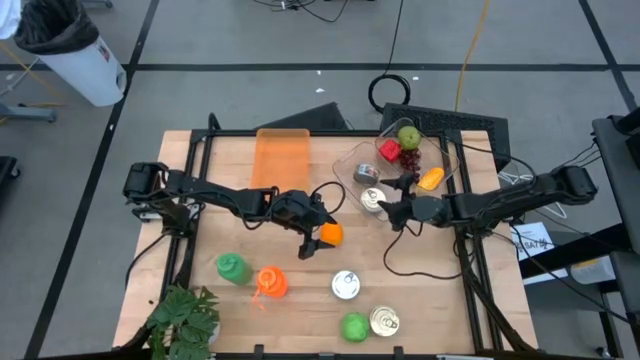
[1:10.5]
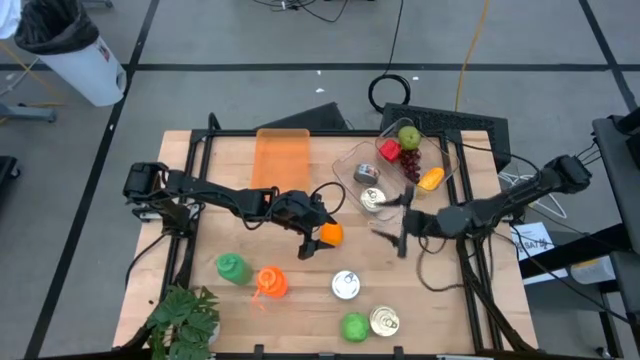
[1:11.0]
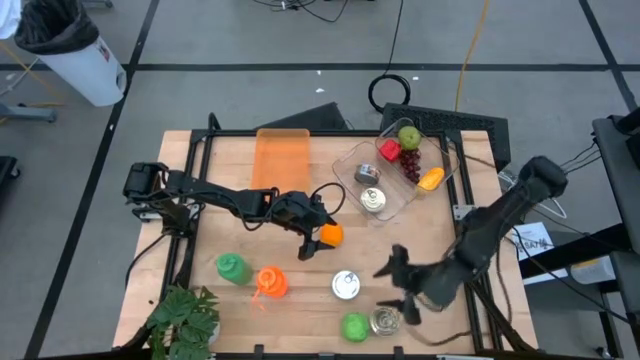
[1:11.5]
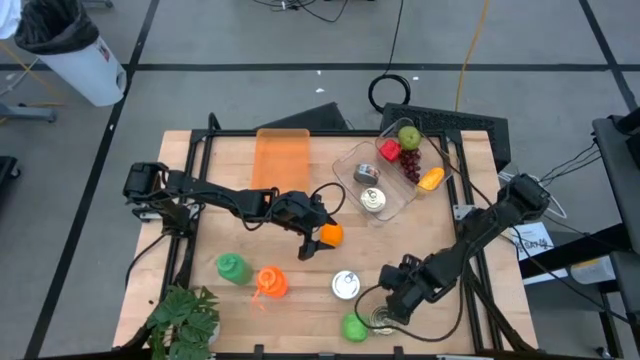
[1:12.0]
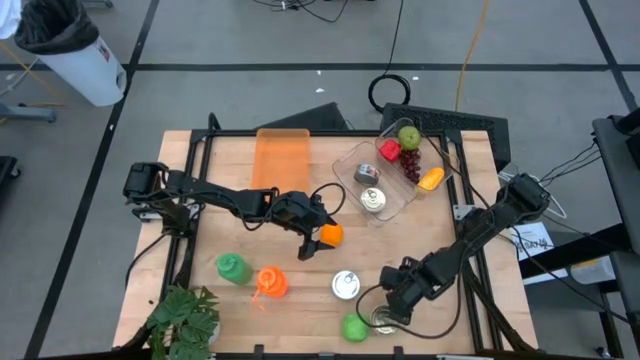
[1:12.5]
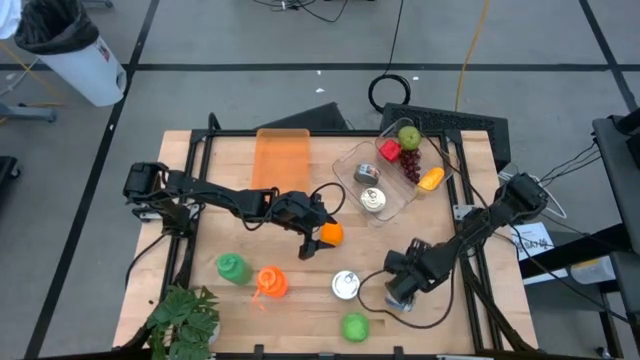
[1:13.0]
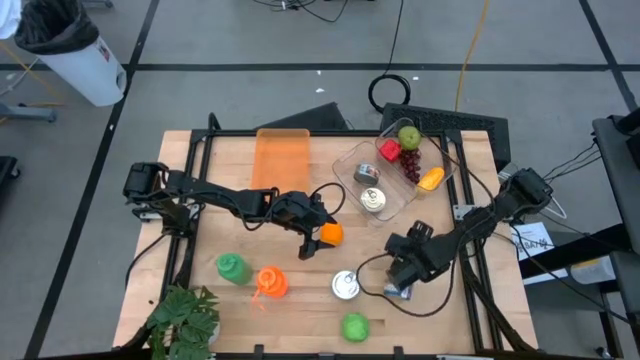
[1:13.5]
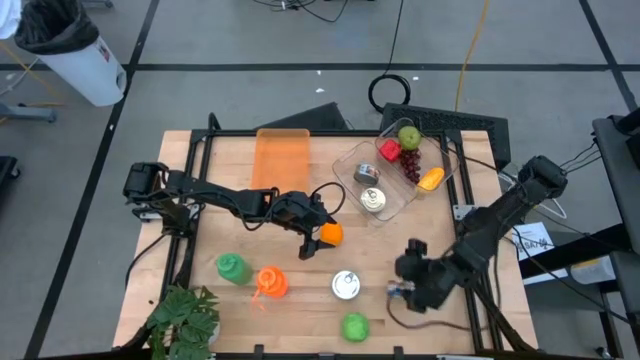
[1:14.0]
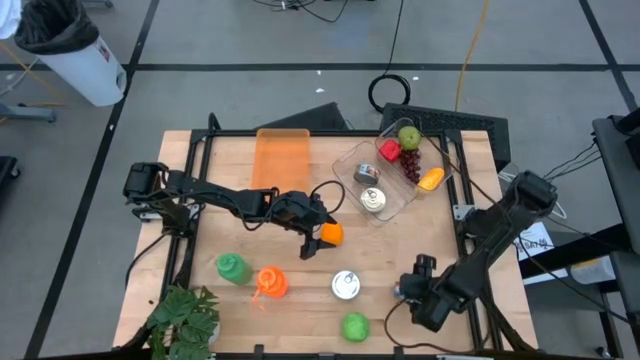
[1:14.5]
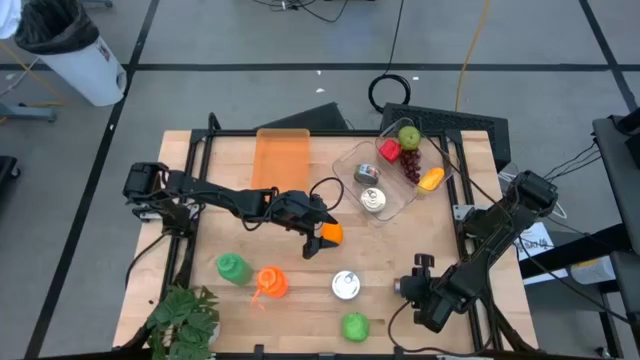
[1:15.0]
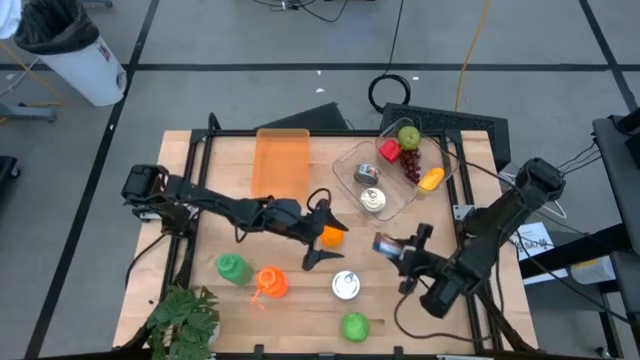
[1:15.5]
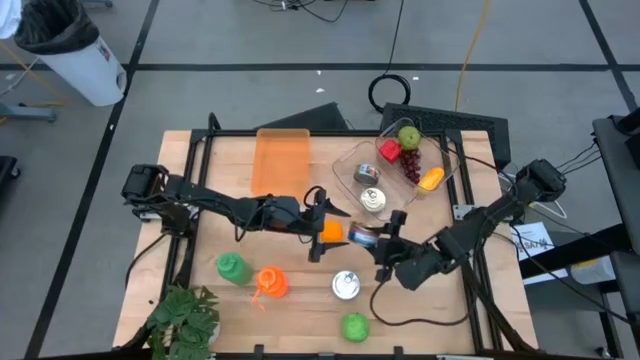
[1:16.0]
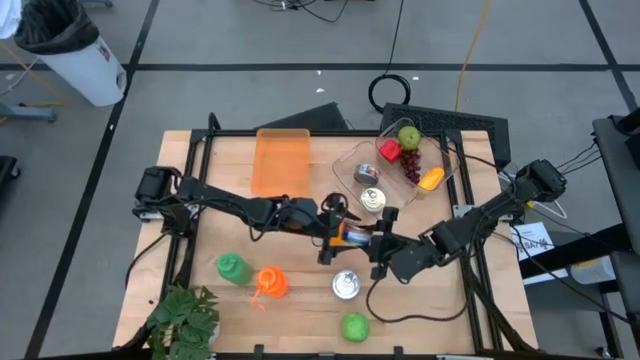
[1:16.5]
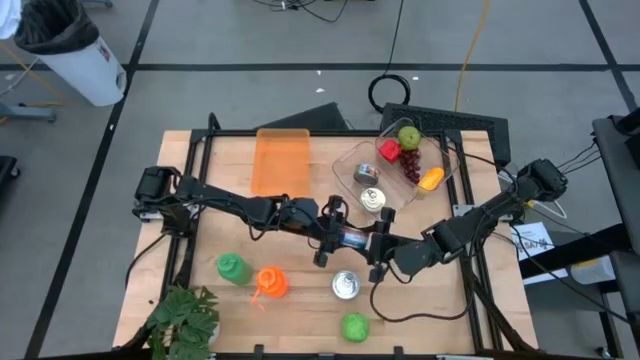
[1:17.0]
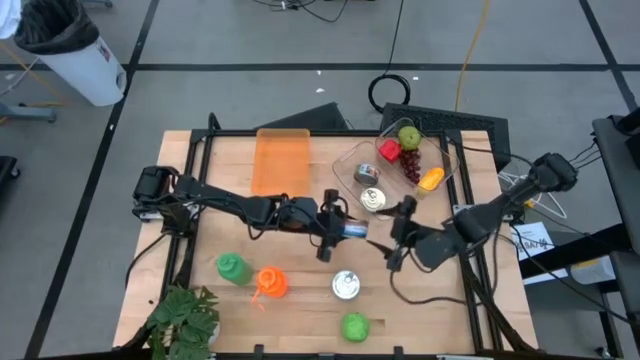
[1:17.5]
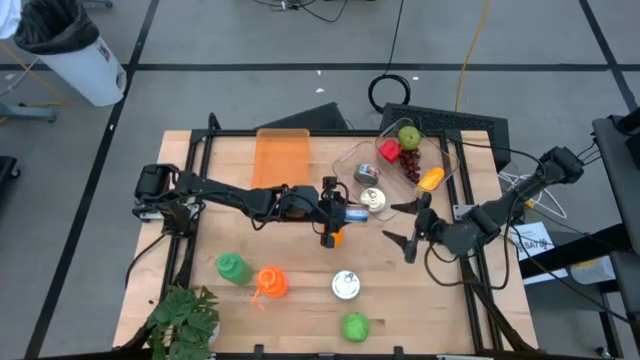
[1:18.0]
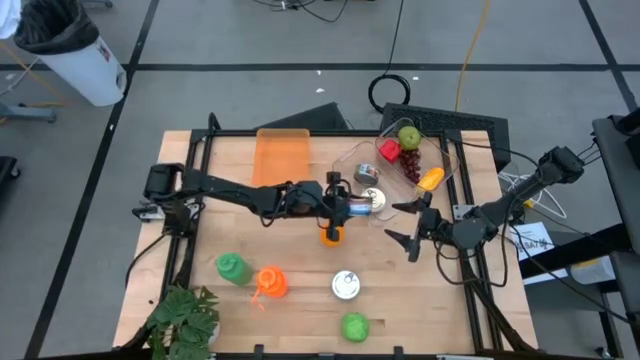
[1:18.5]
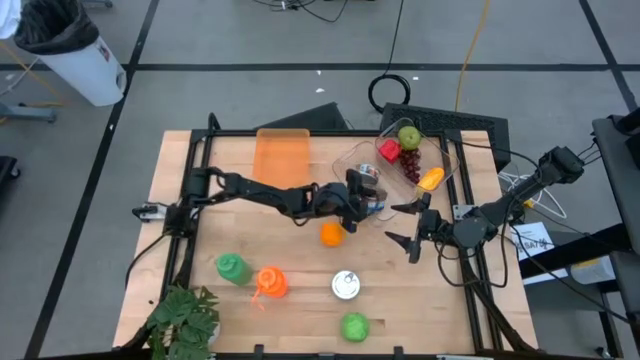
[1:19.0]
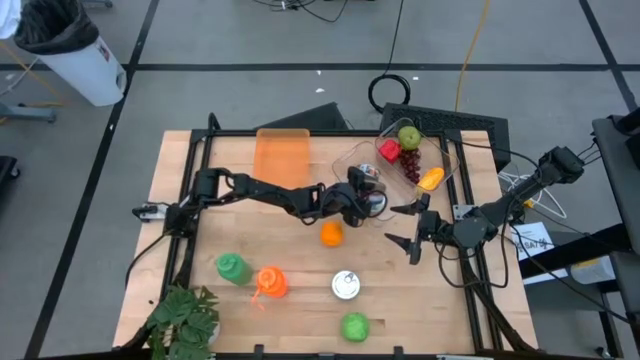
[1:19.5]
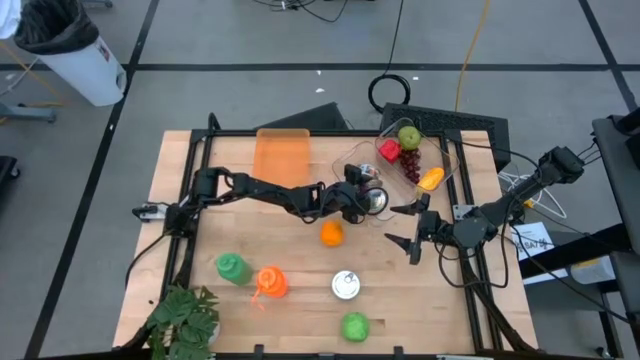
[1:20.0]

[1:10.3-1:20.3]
Task: Pick & Place Food Item
Put the blue tuna can into the left transparent bin

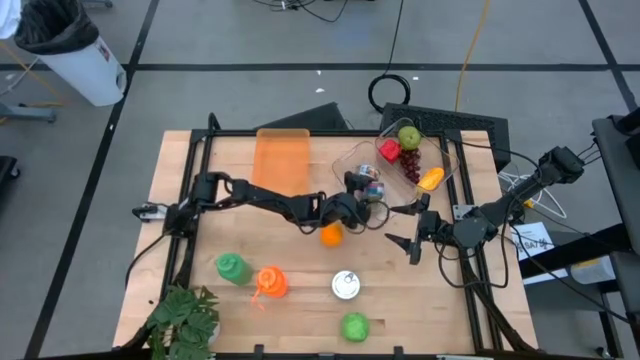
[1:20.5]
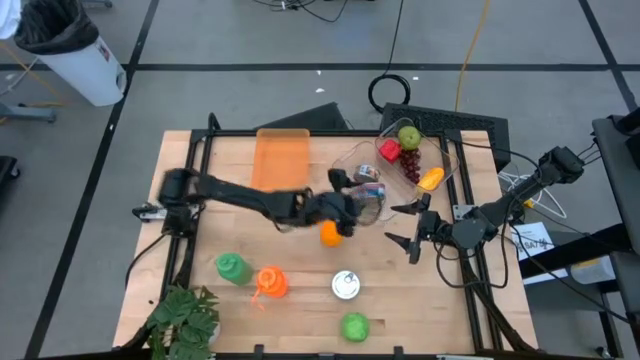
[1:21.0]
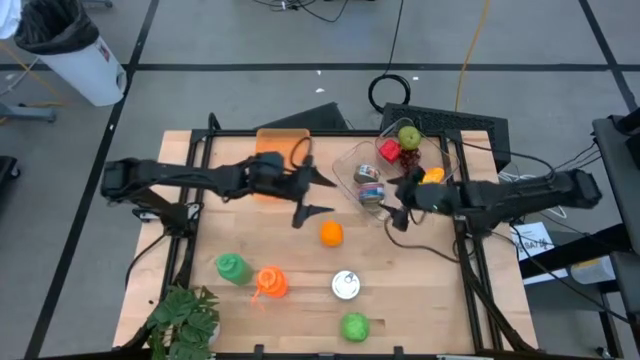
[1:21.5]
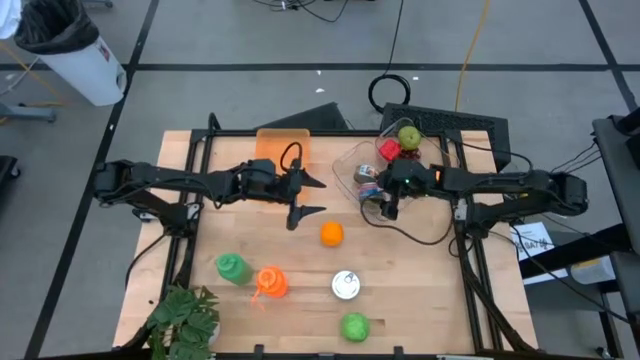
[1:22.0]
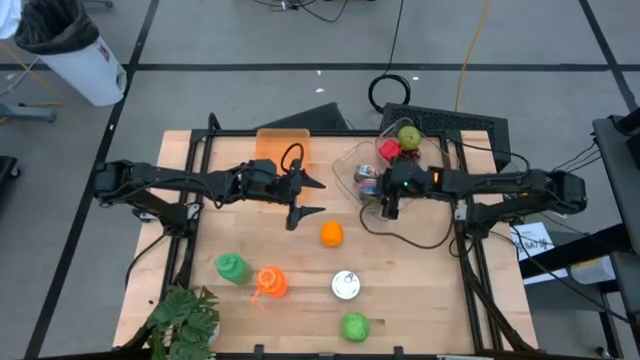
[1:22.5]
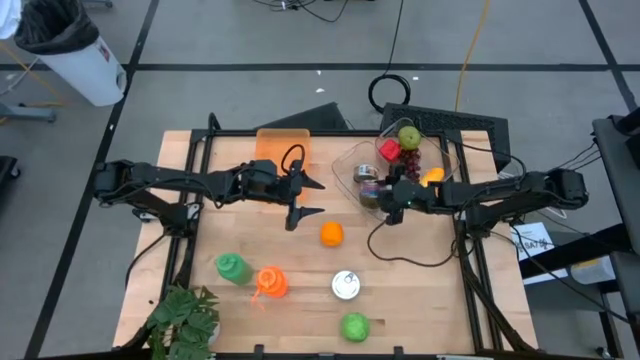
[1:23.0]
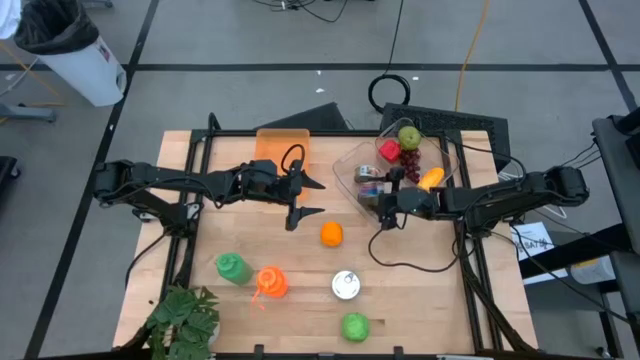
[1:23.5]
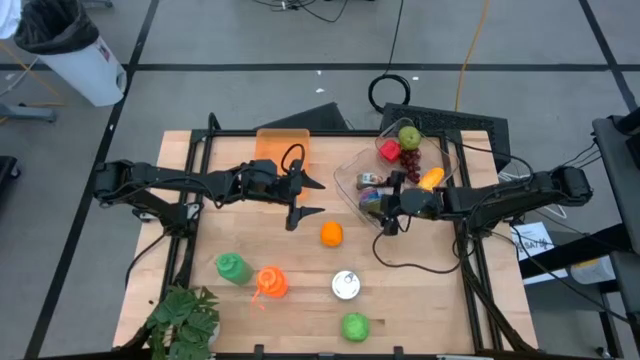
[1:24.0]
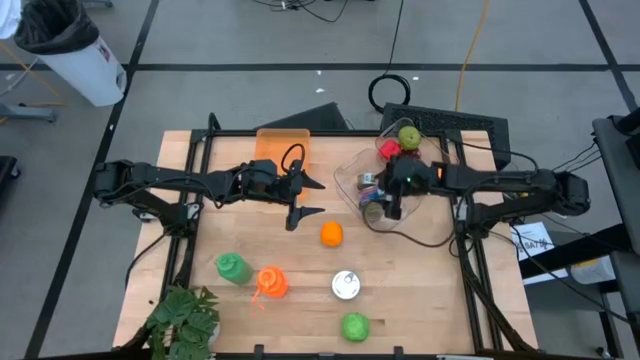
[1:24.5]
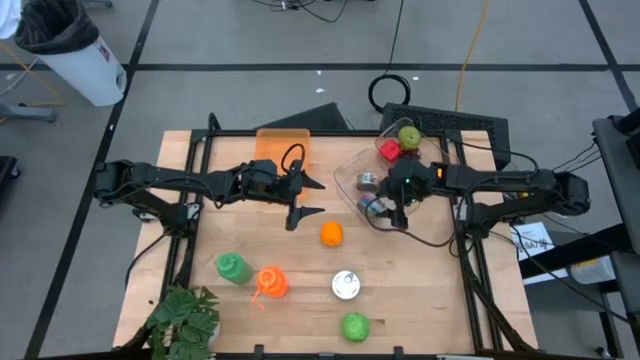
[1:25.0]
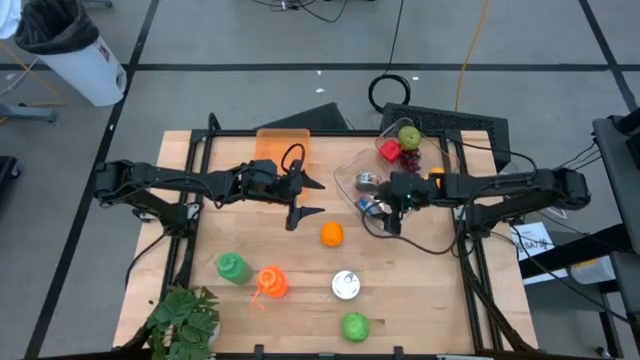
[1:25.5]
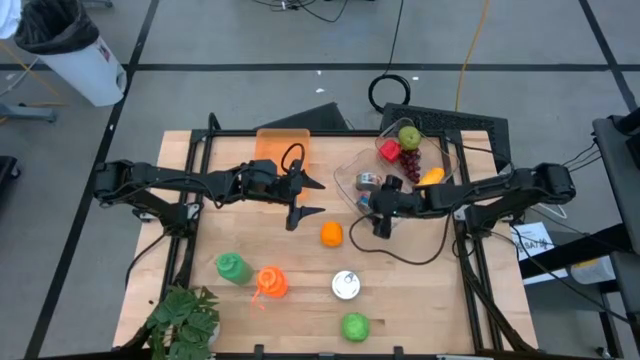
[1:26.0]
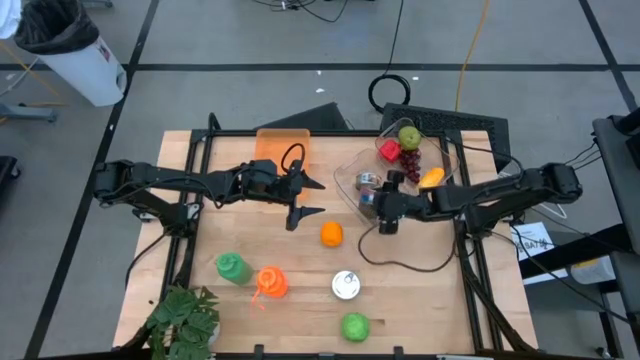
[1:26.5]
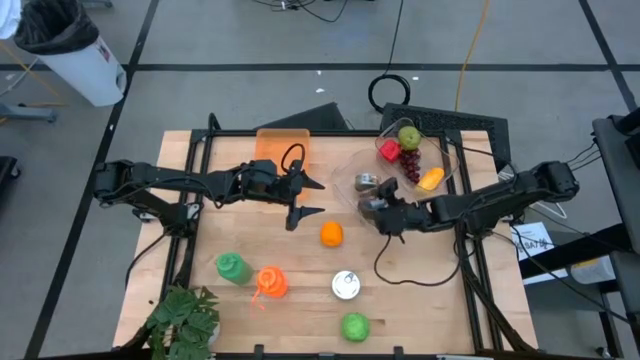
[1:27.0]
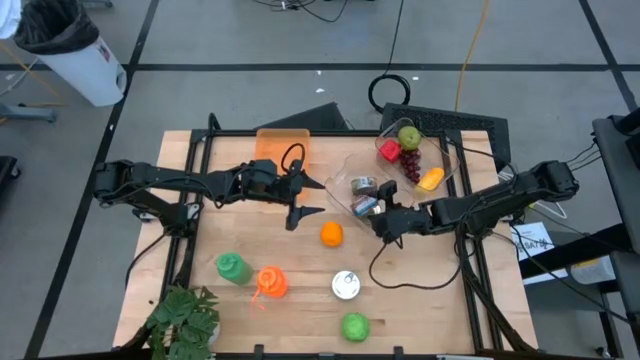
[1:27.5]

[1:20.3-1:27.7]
Adjust the tuna can into the bin

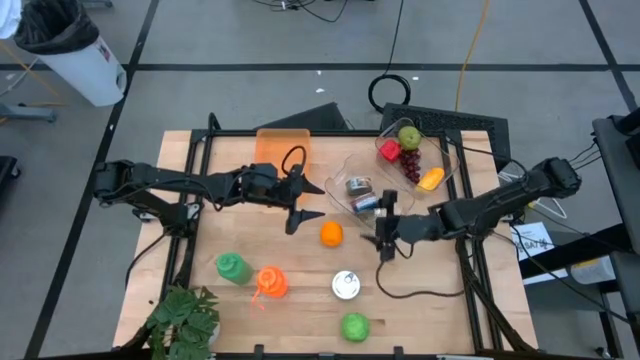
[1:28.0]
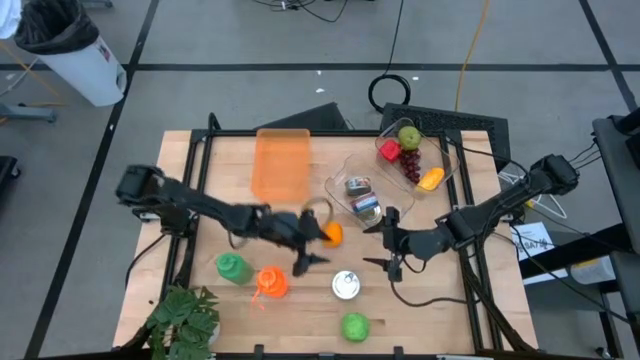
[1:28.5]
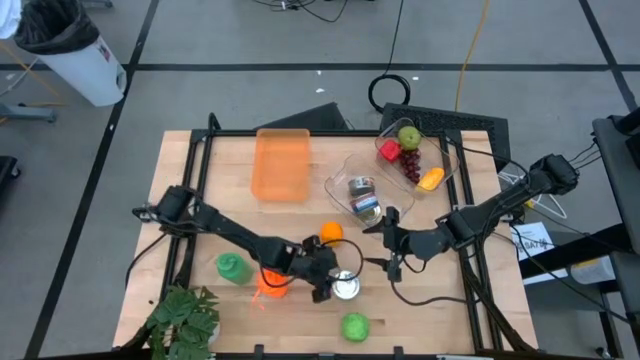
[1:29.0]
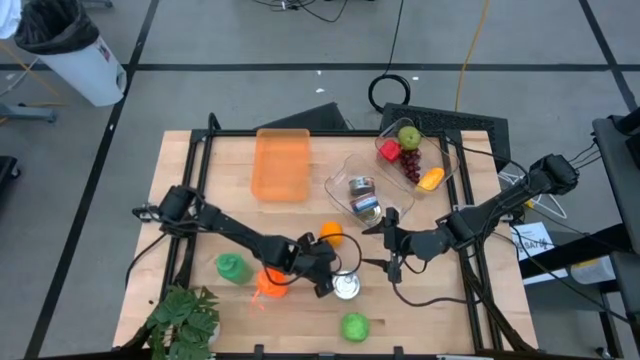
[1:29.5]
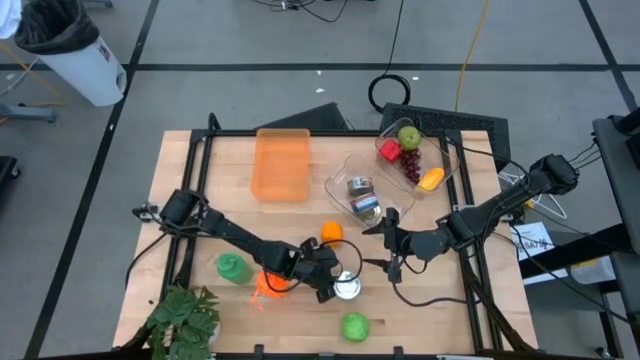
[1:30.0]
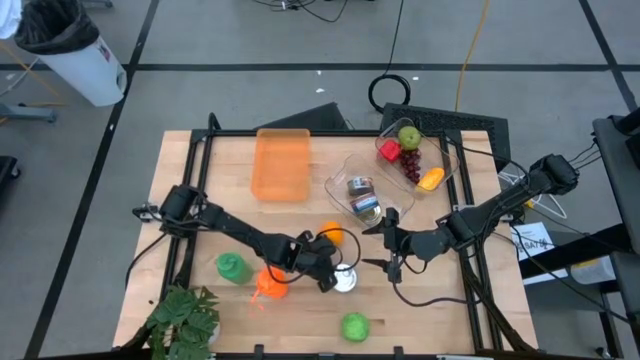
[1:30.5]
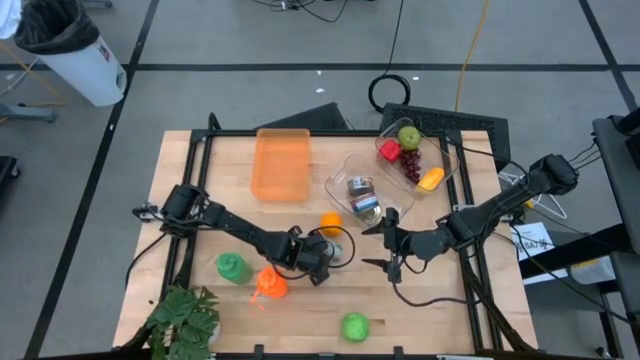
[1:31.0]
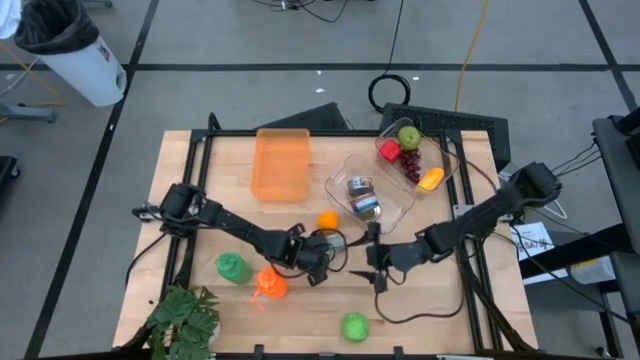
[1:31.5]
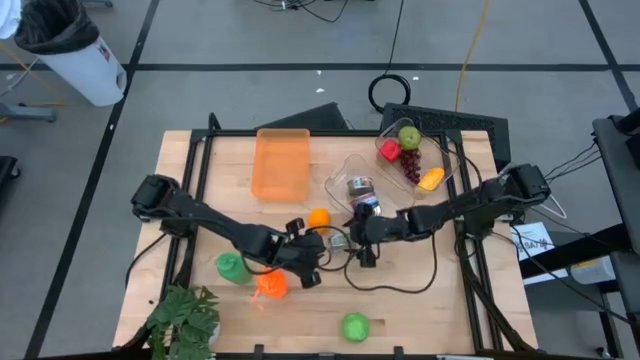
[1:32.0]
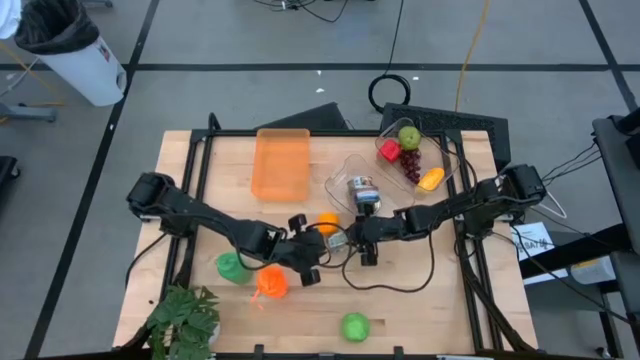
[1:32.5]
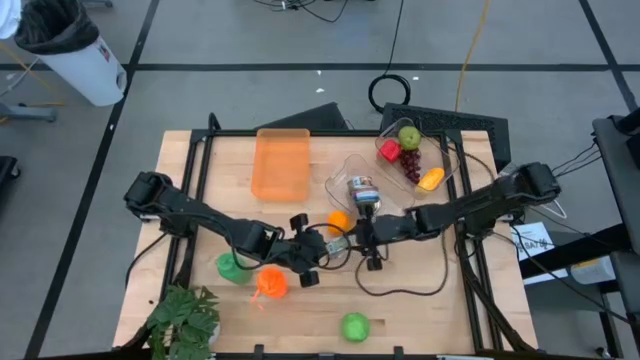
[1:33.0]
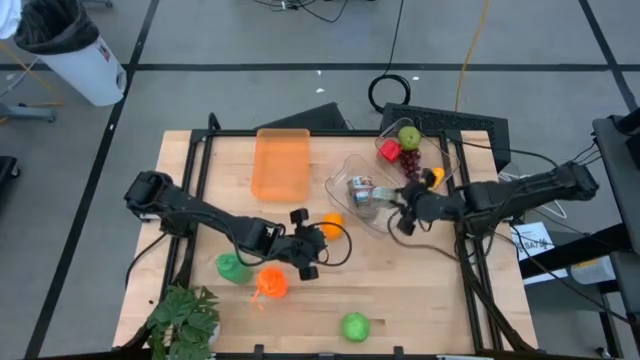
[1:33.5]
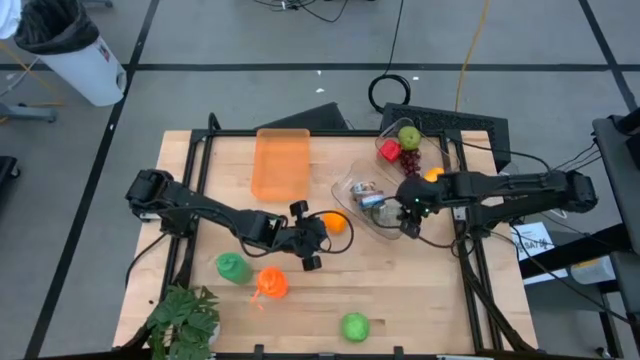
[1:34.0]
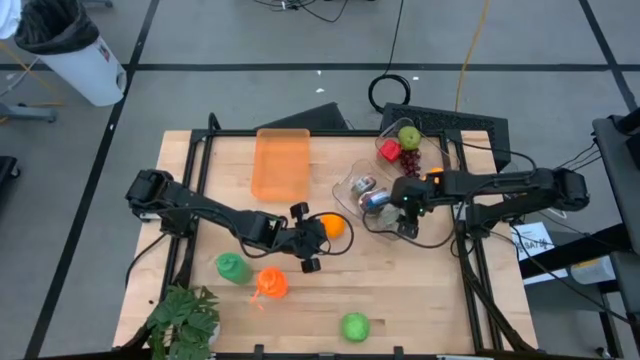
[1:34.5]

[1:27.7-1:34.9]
Put the green tuna can into the left transparent bin
